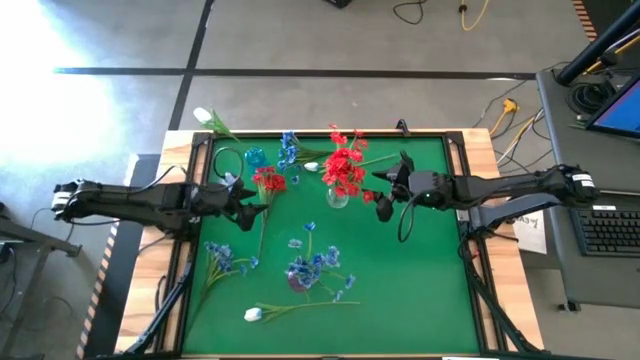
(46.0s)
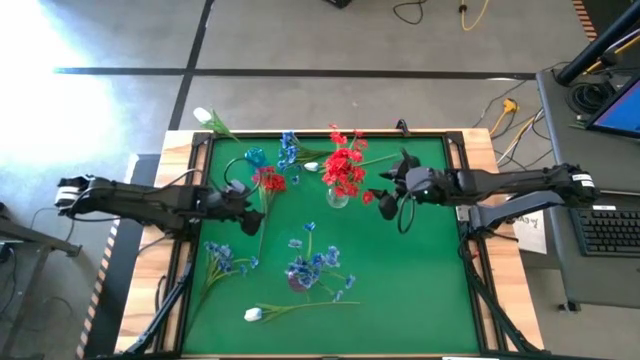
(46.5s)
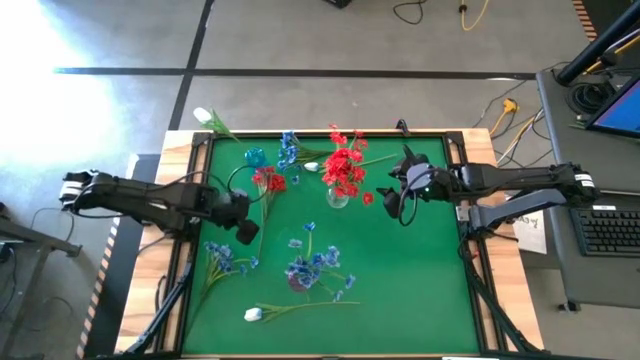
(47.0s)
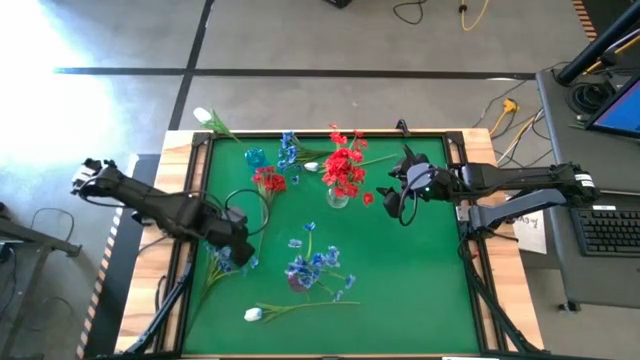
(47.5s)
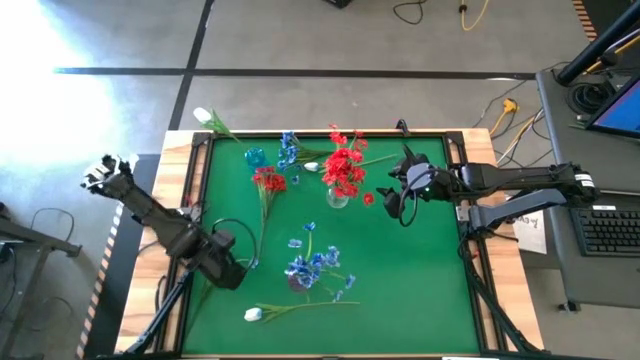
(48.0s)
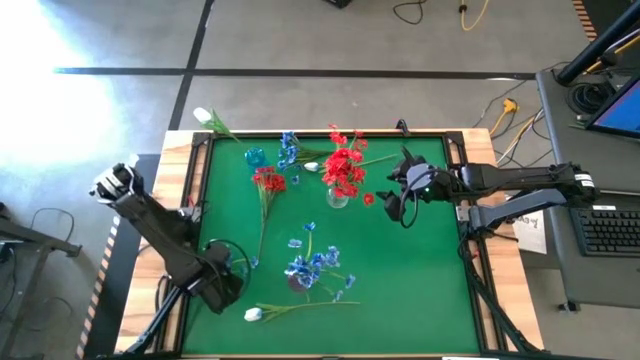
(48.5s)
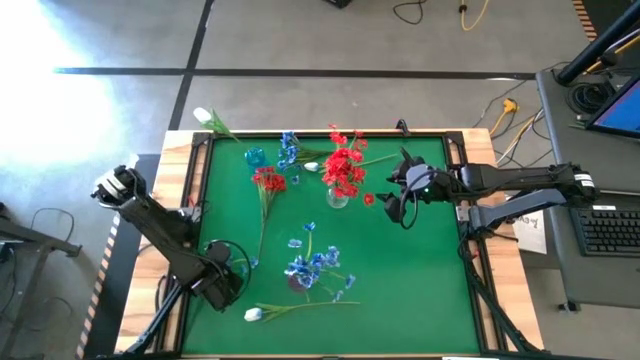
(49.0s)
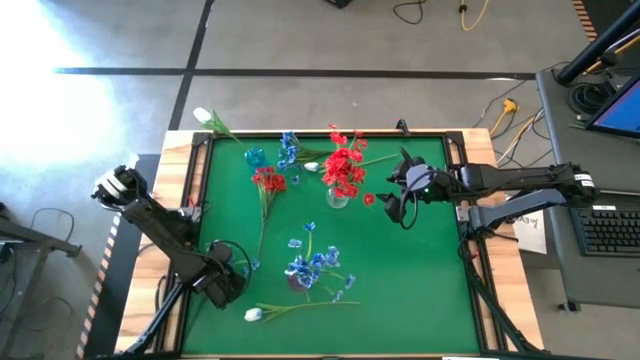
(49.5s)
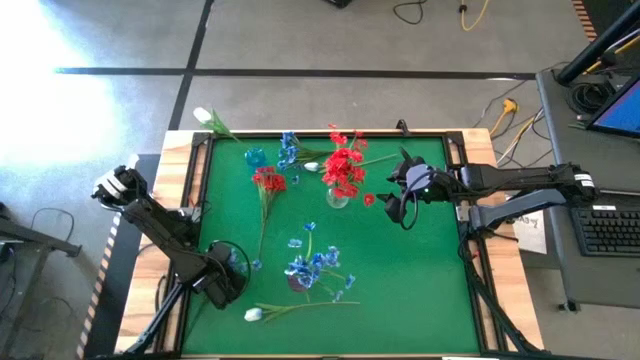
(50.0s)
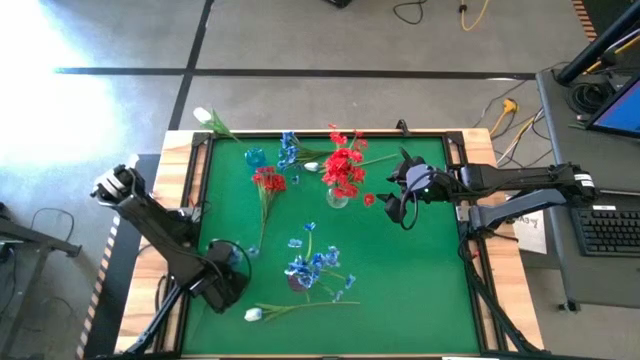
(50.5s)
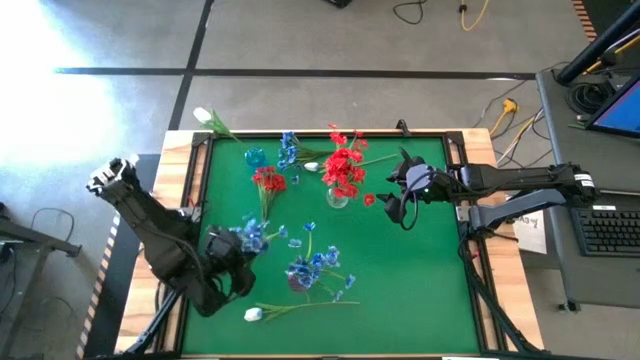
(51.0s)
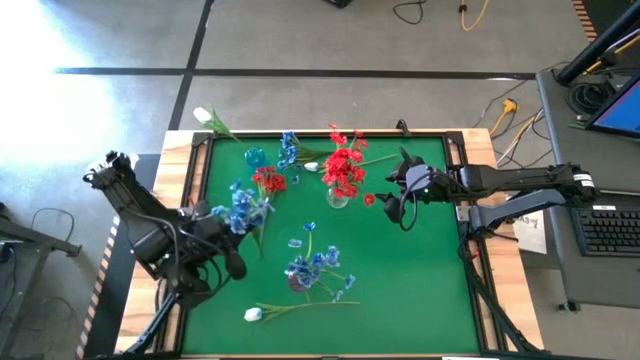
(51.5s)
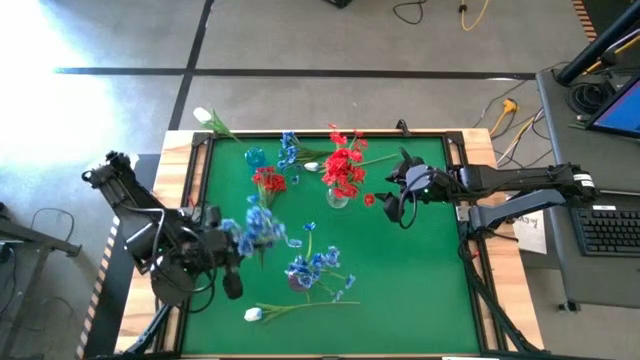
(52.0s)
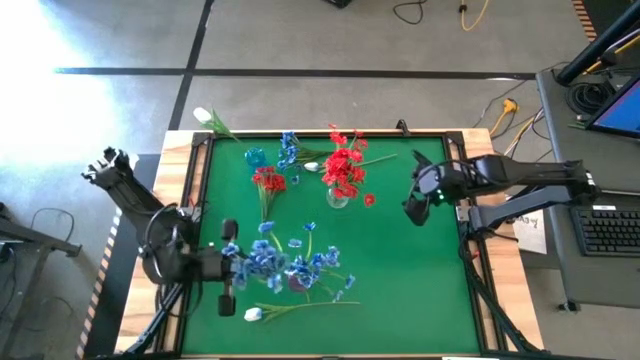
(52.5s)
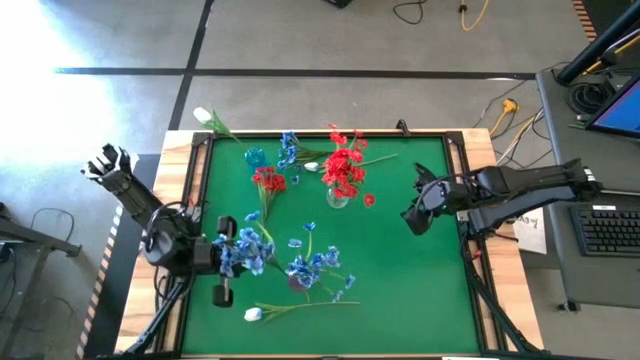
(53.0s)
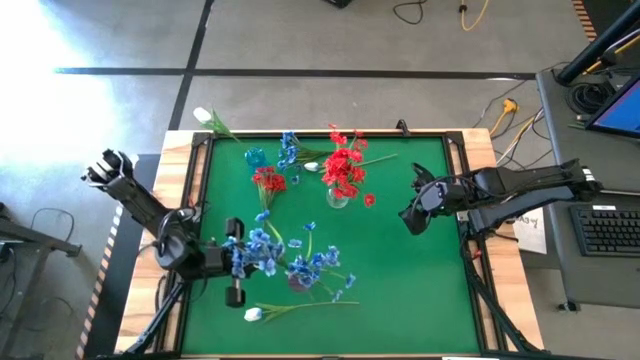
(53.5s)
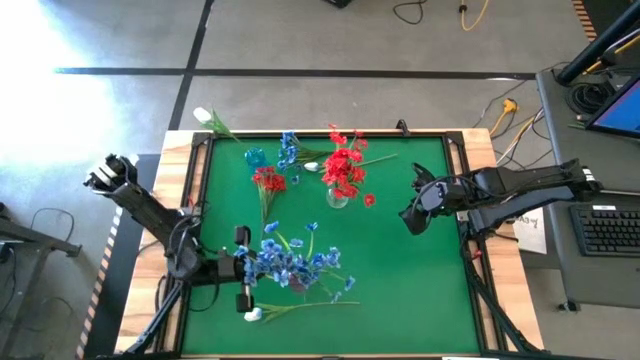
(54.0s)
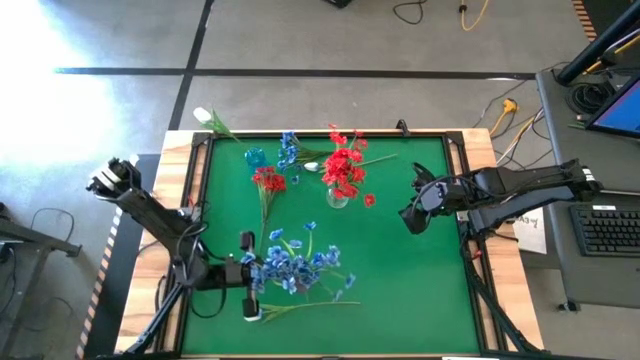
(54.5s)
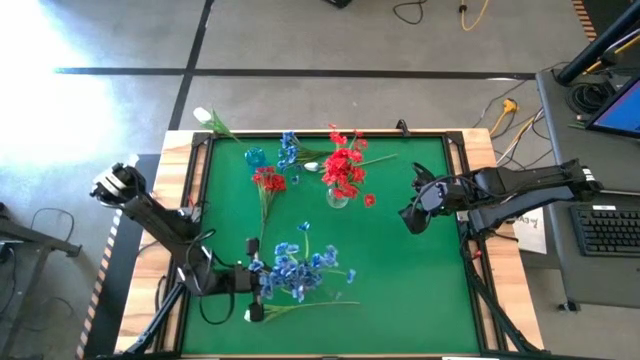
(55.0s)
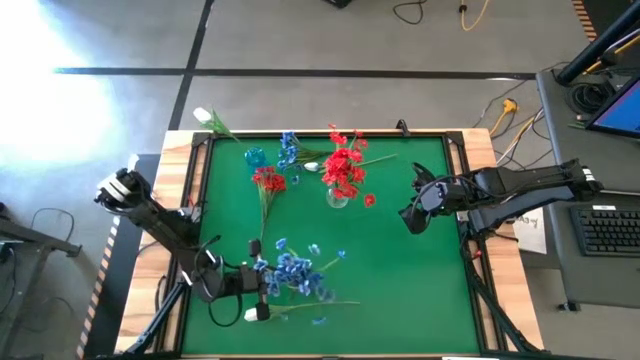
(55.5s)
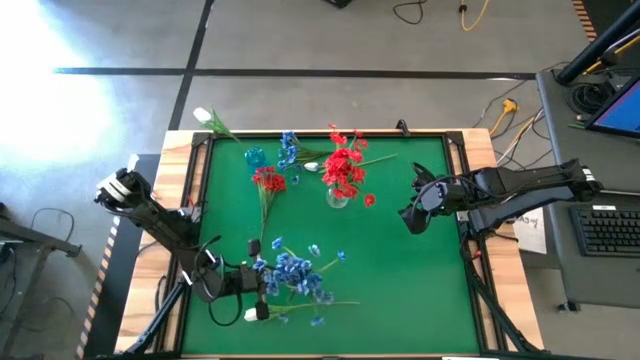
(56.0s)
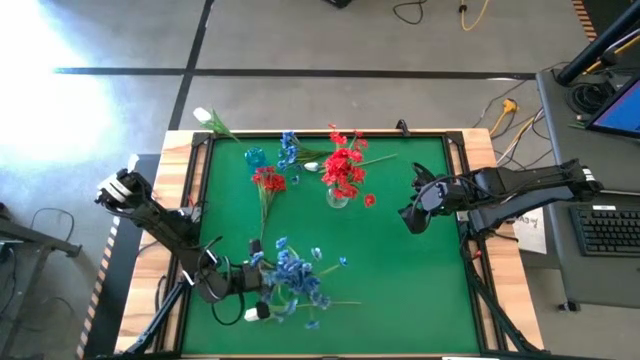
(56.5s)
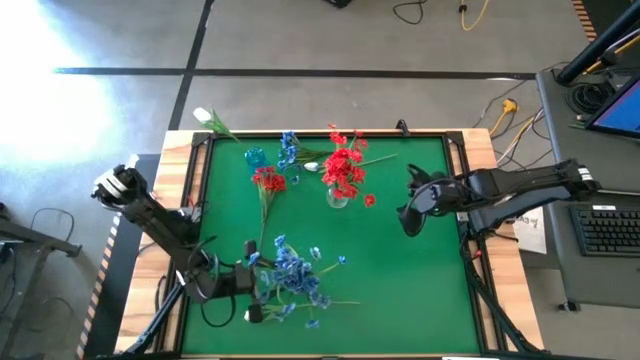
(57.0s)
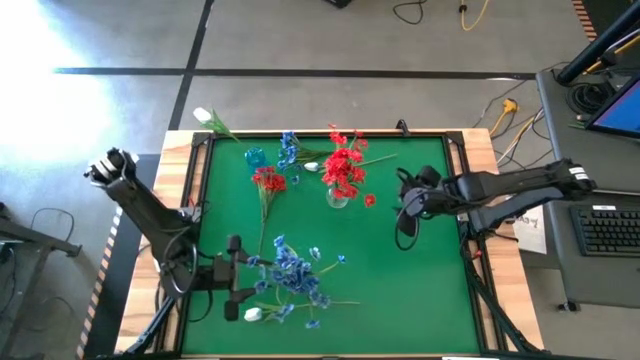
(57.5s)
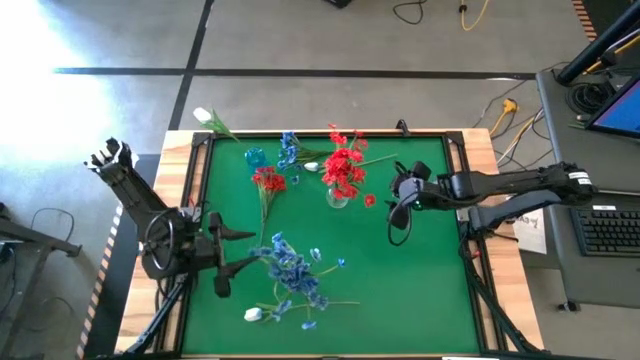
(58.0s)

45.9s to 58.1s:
Task: Sort flowers into vase by color
Put the bottom blue flowers into the violet vase

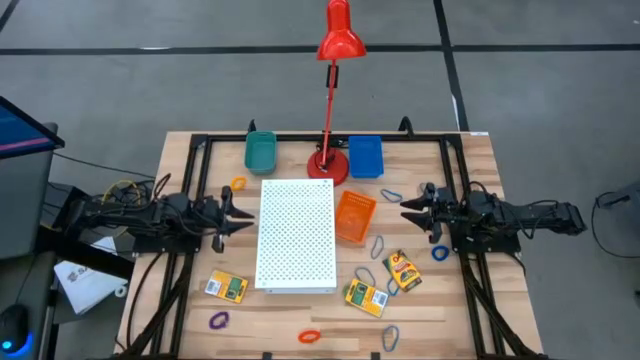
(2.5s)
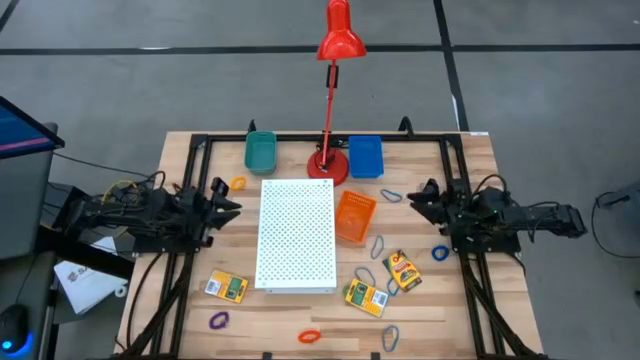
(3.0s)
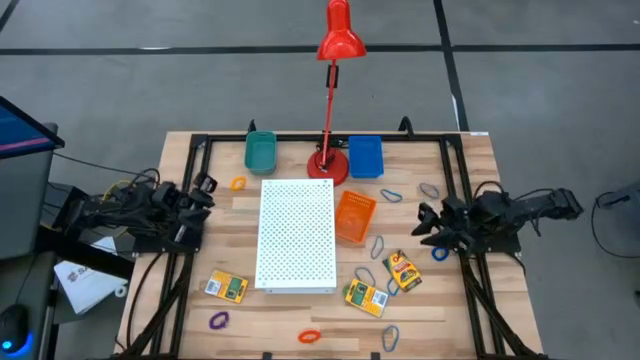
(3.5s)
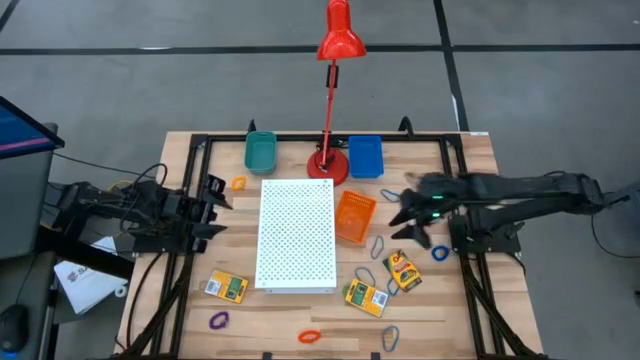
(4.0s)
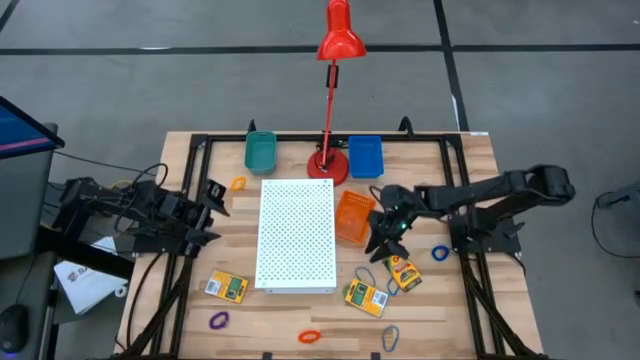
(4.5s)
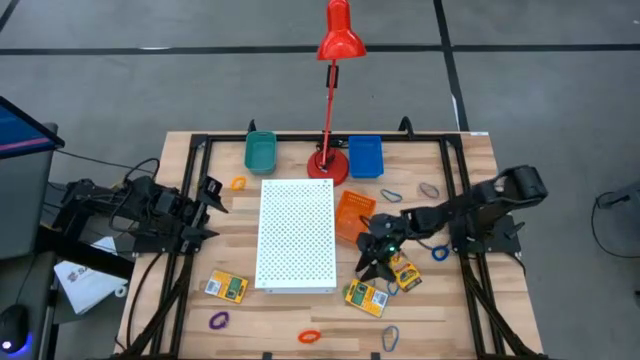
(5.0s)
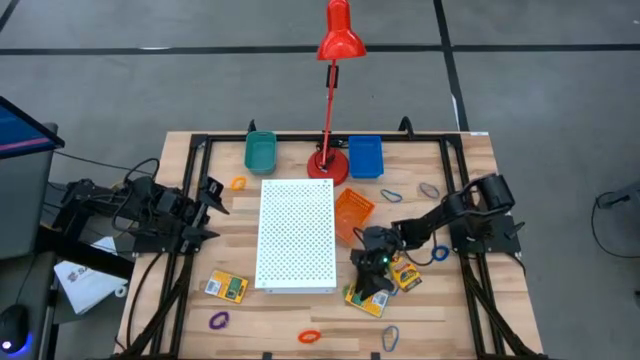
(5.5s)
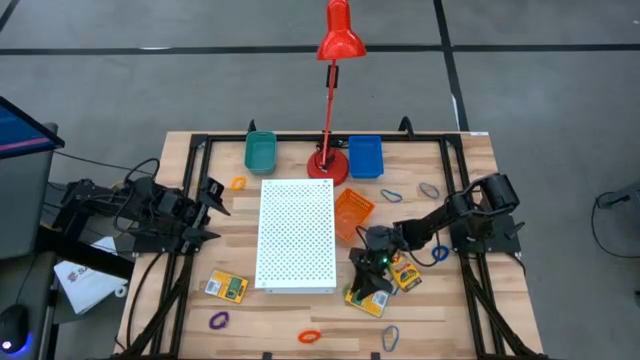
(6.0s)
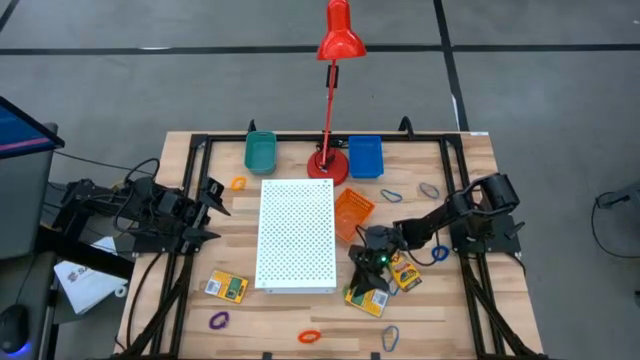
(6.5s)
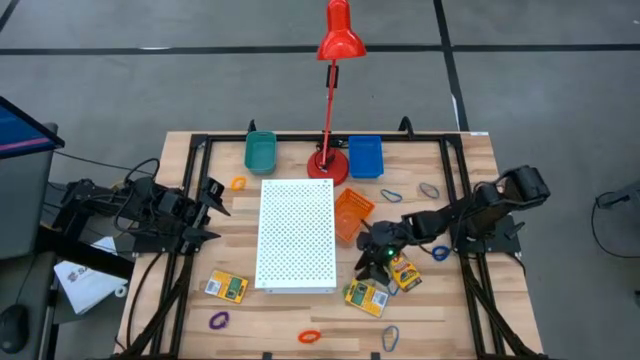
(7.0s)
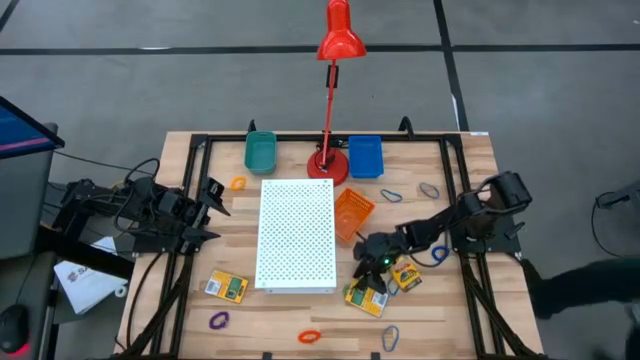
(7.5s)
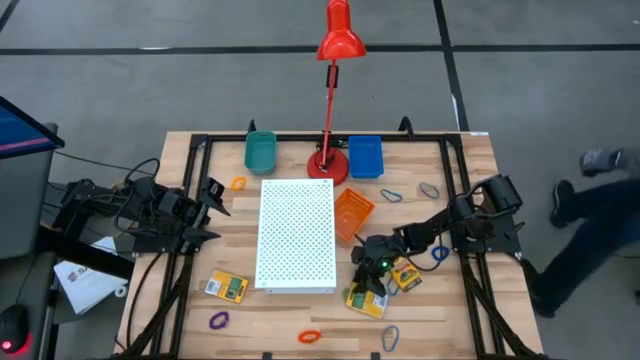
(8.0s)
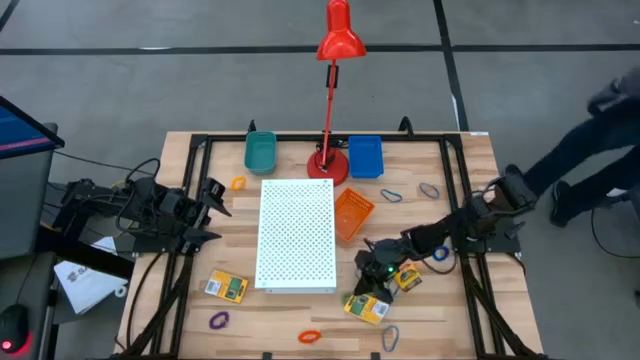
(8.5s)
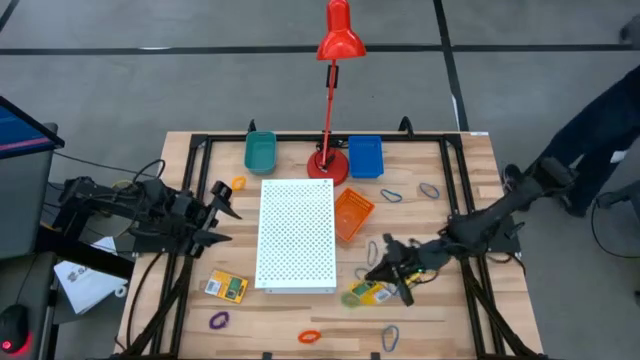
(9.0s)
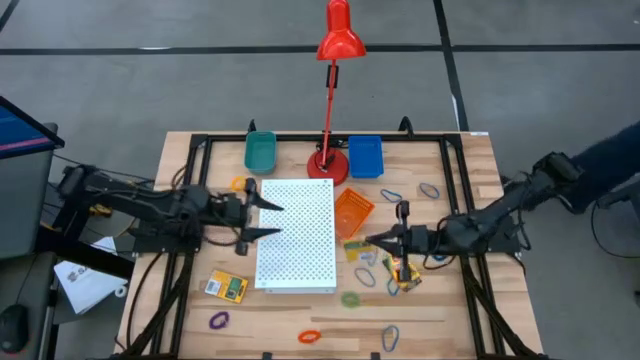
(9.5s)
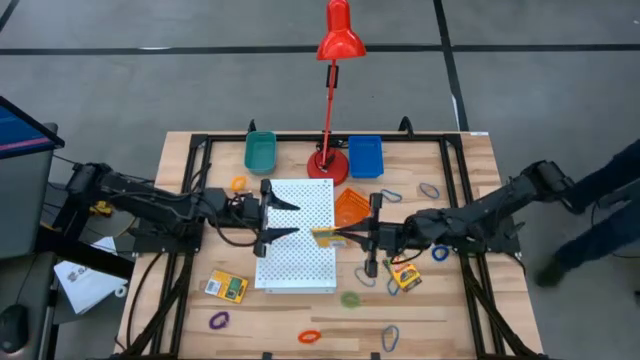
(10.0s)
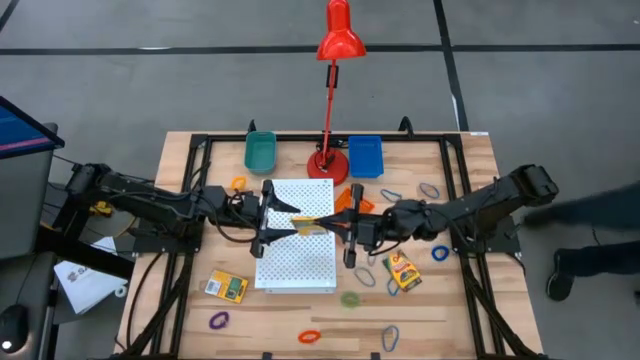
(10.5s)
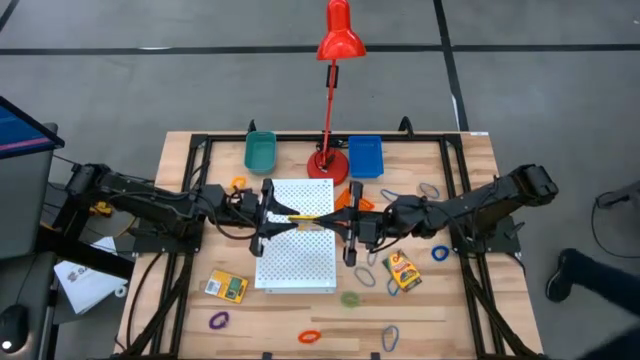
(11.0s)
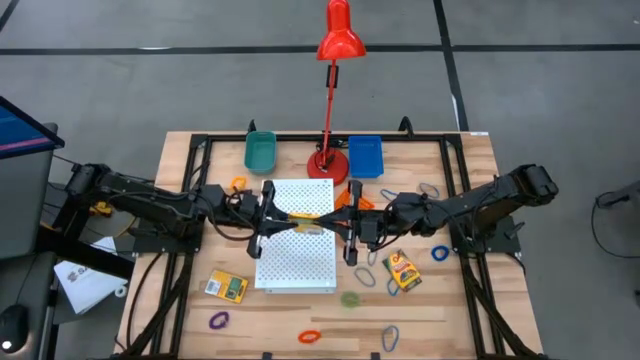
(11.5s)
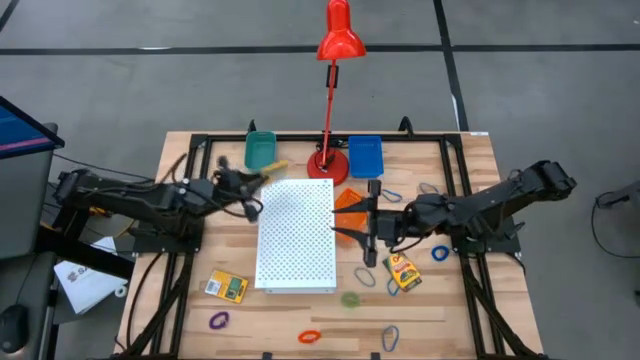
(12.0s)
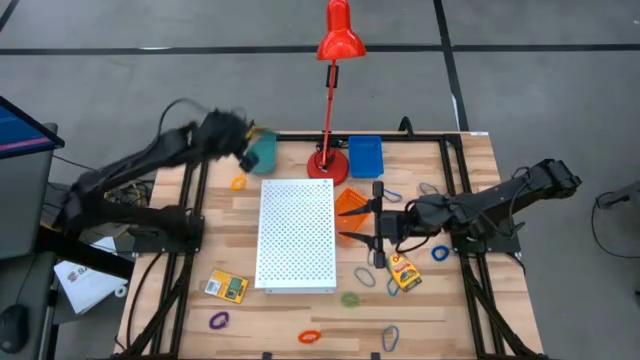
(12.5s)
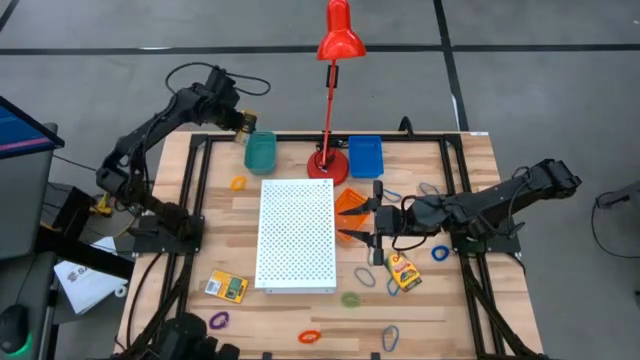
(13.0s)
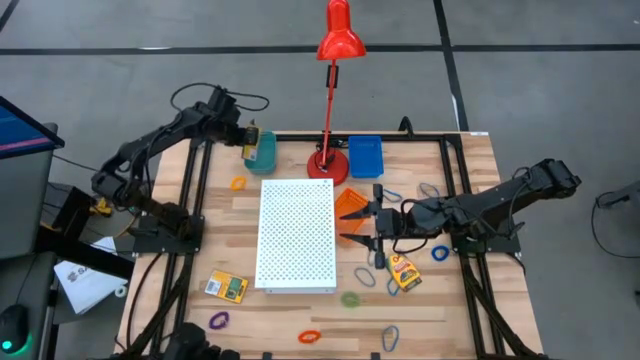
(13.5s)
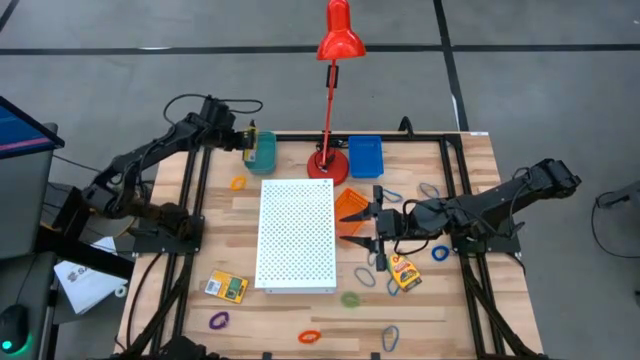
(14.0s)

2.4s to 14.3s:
Task: Pick & Place Office Desk Supplies
Put the yellow crayon box into the green bin
